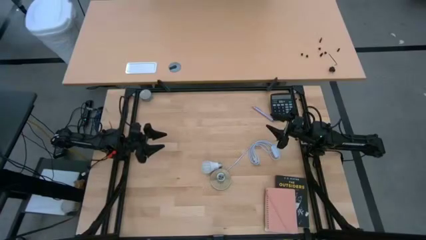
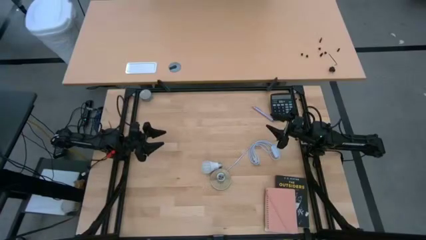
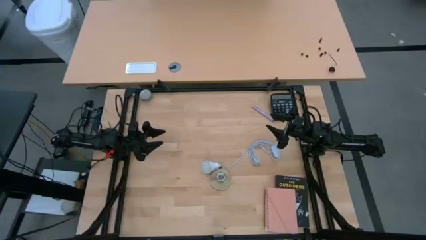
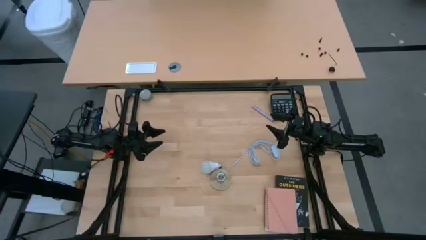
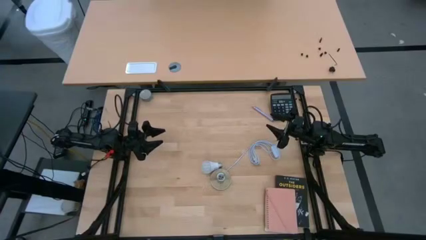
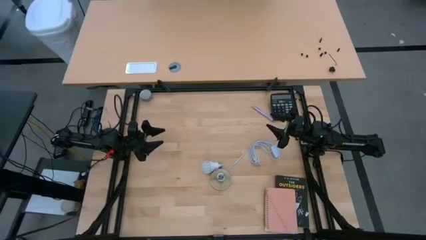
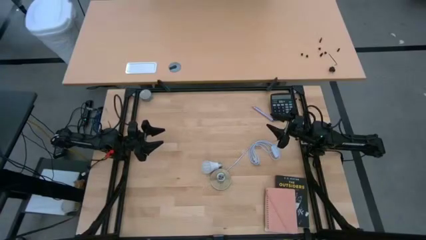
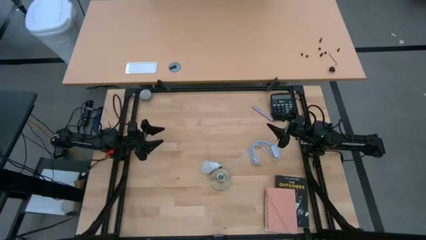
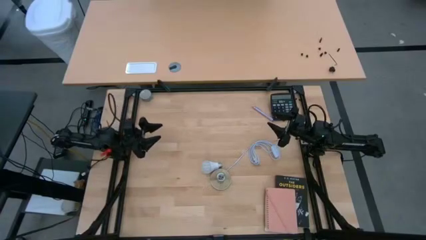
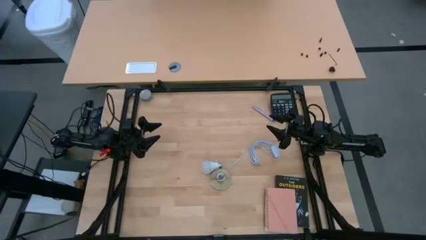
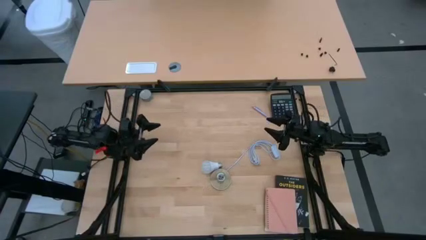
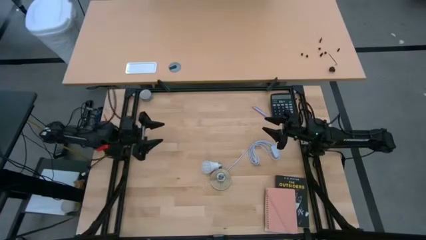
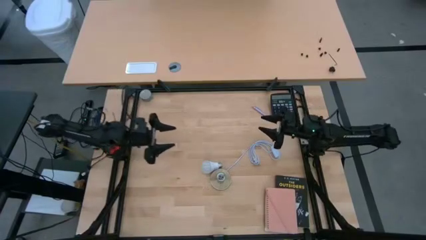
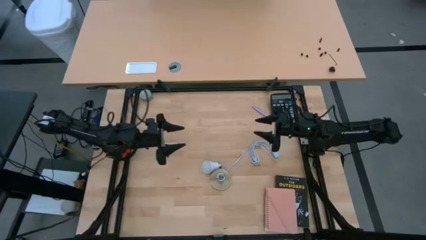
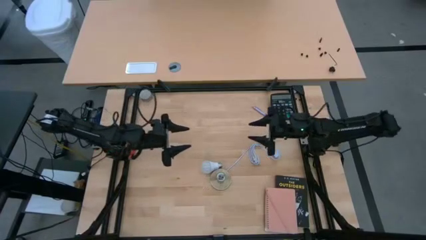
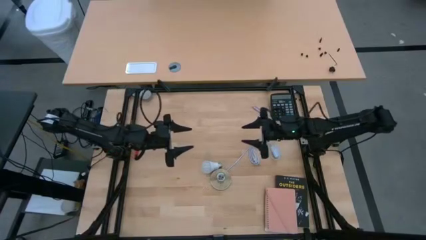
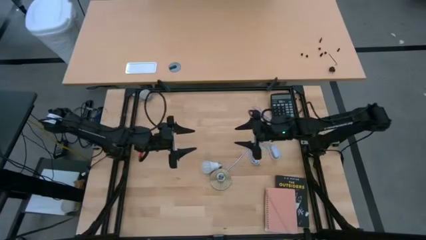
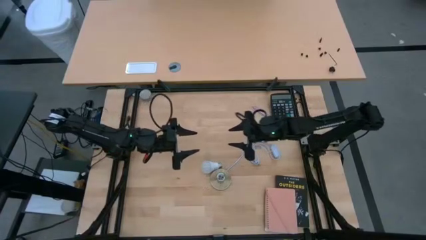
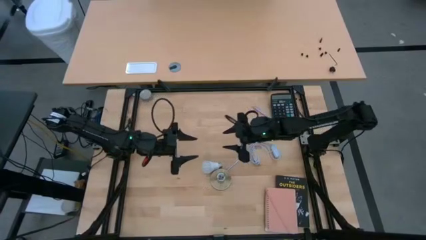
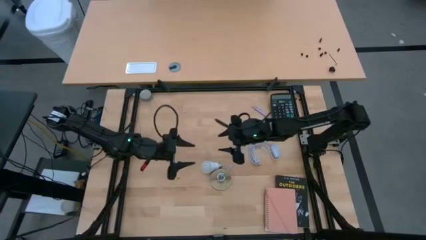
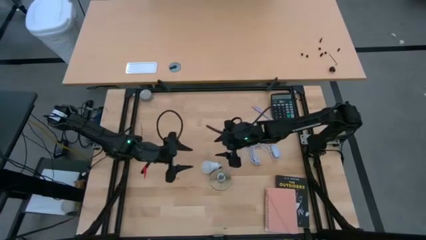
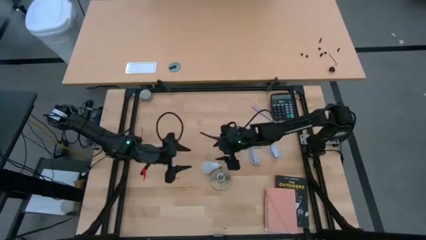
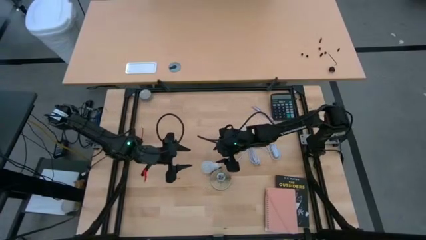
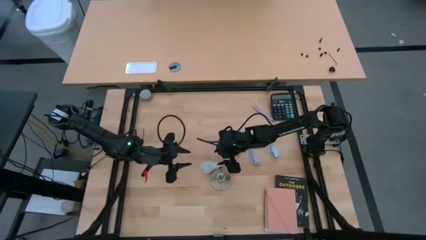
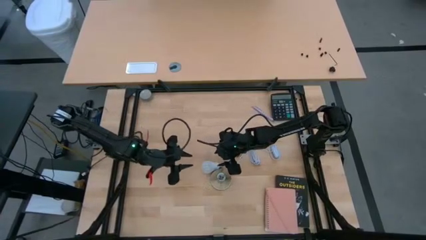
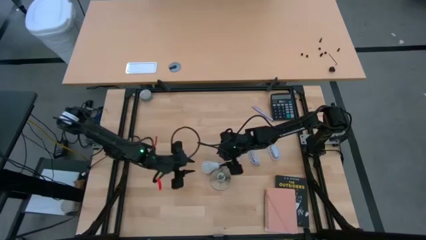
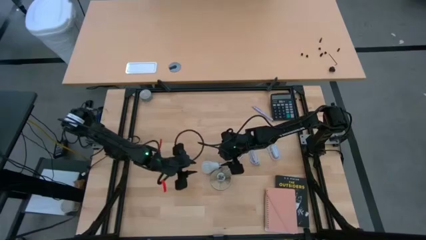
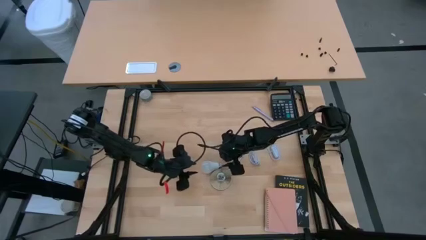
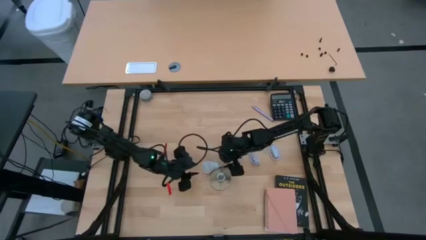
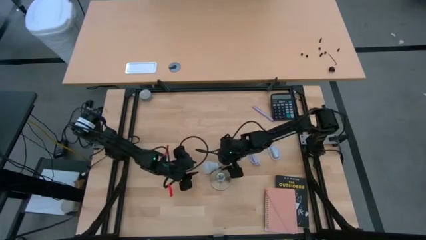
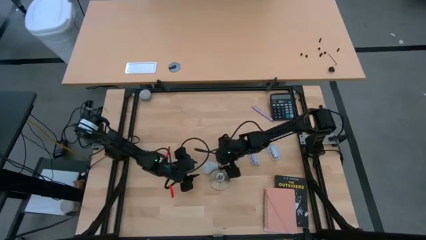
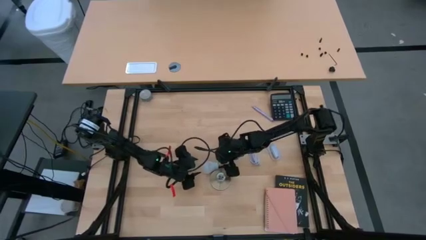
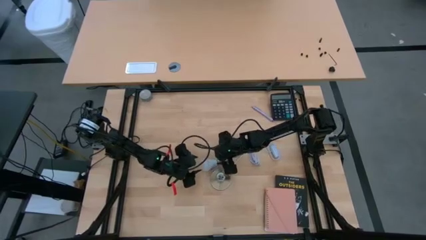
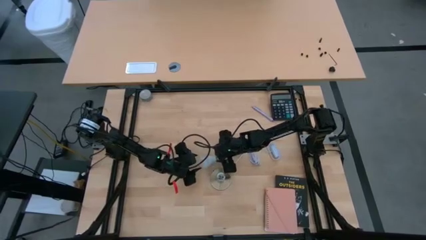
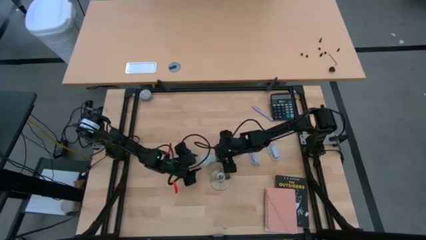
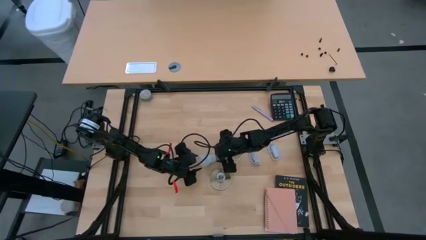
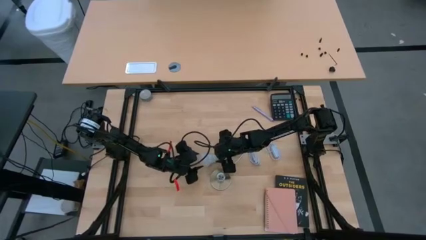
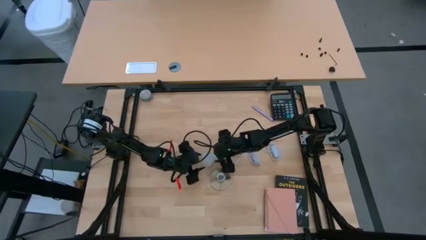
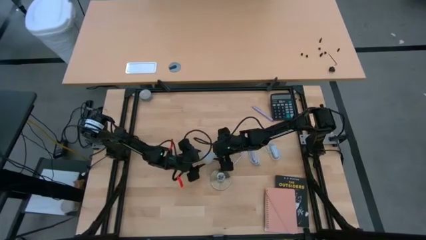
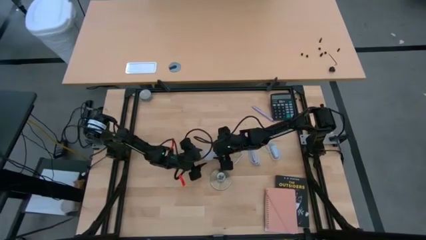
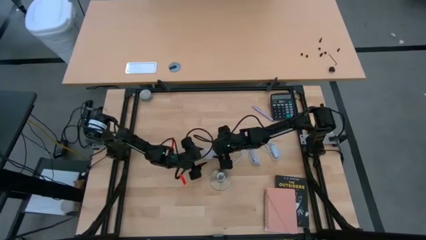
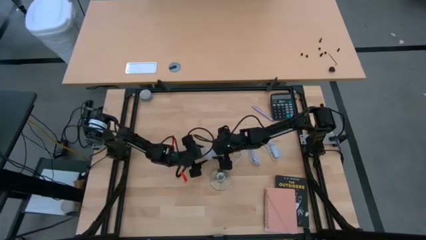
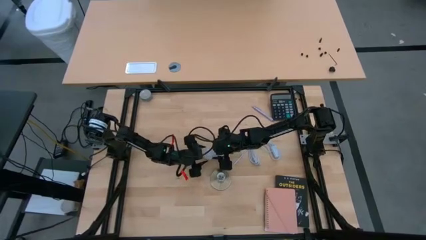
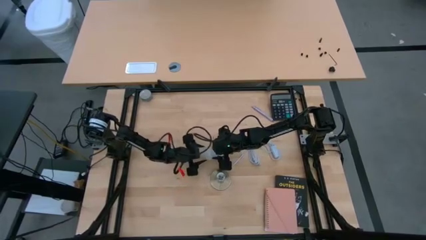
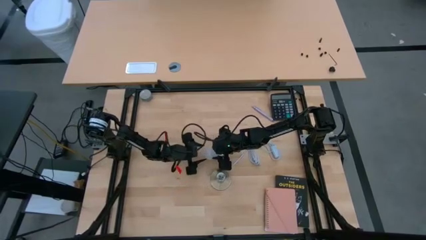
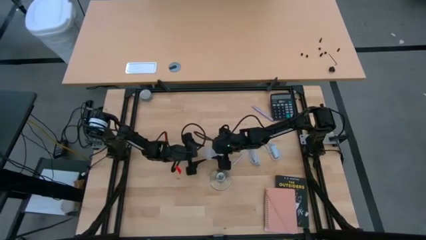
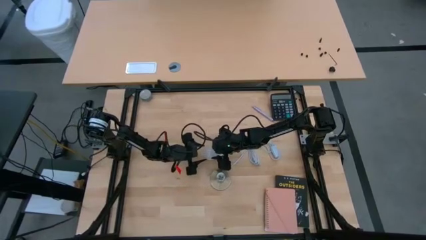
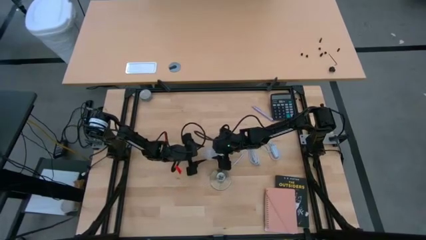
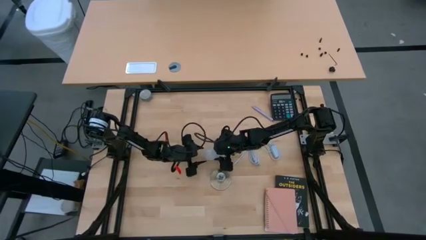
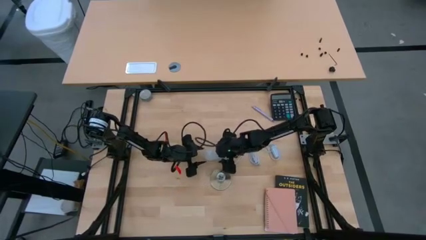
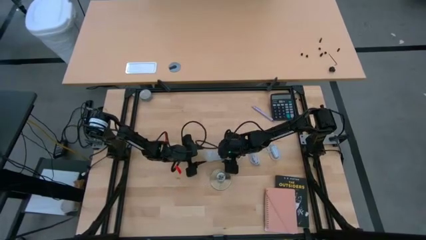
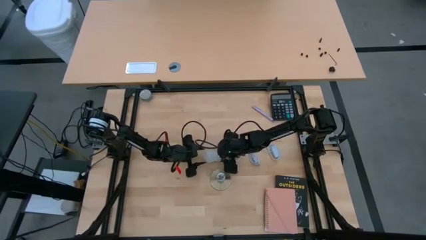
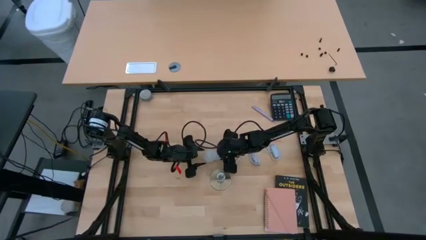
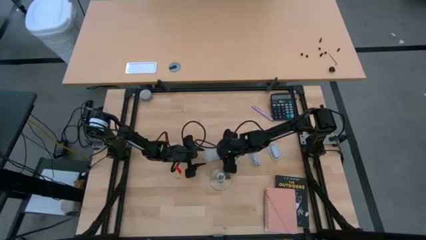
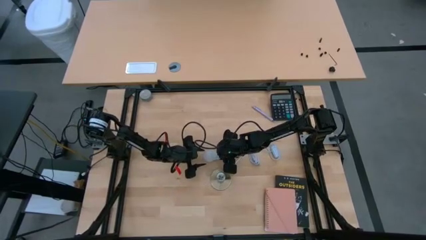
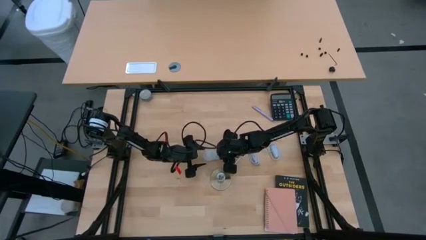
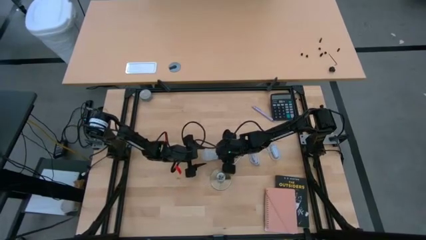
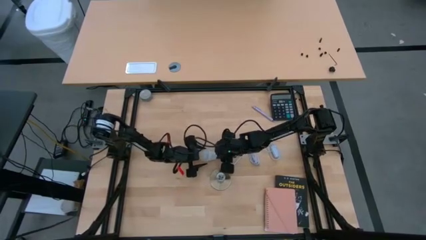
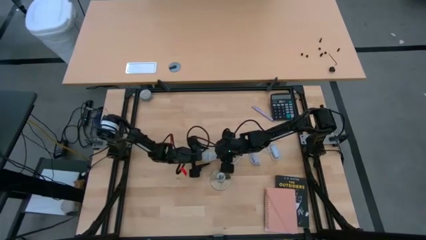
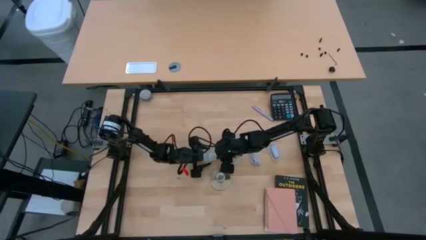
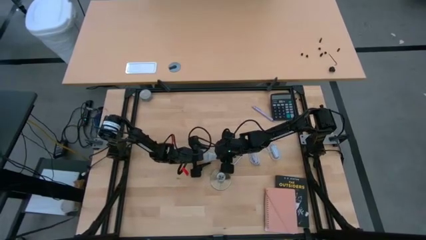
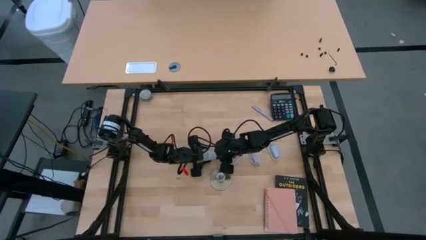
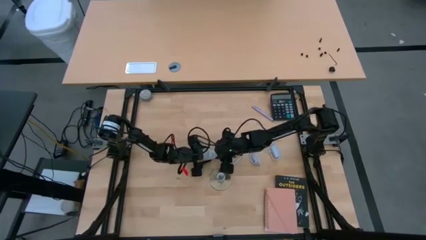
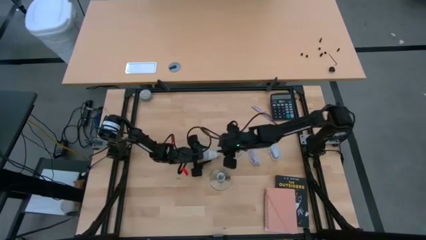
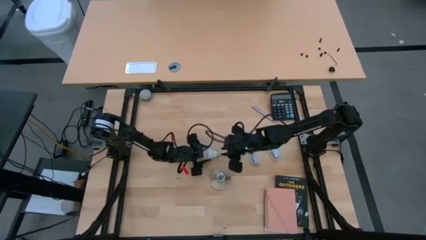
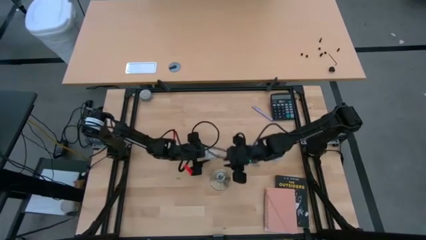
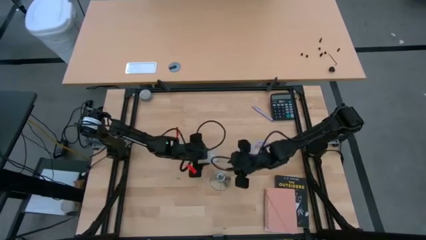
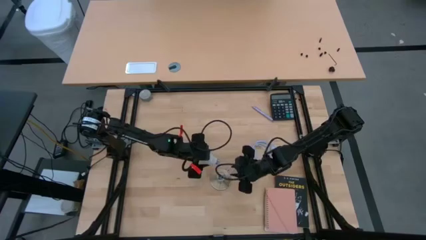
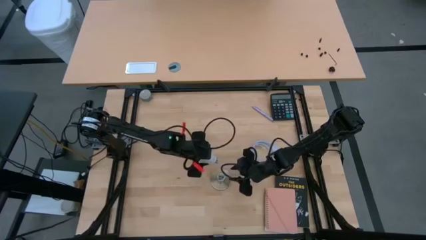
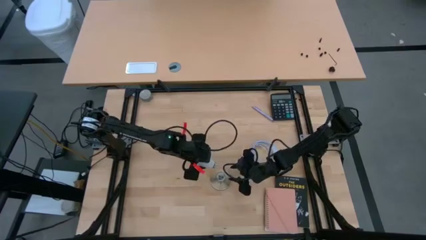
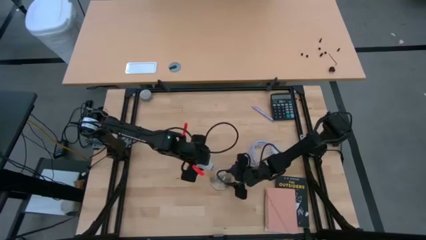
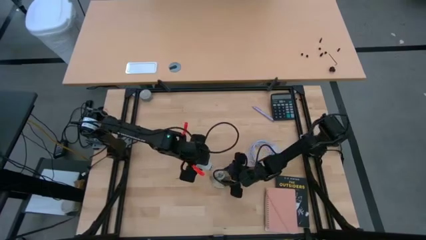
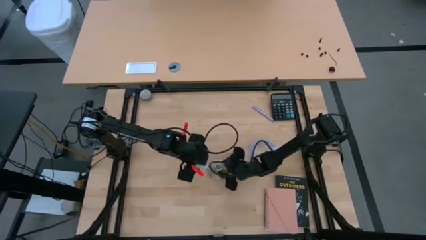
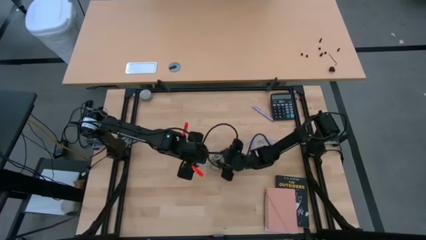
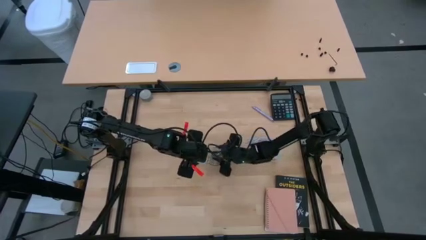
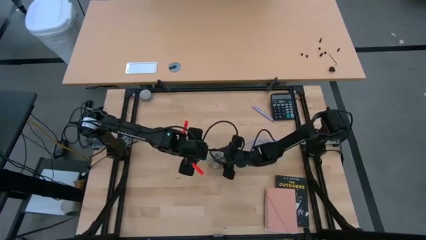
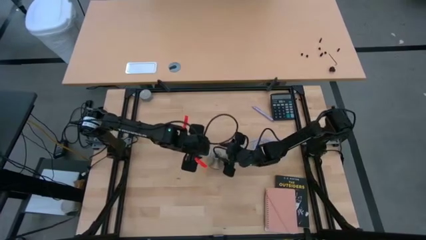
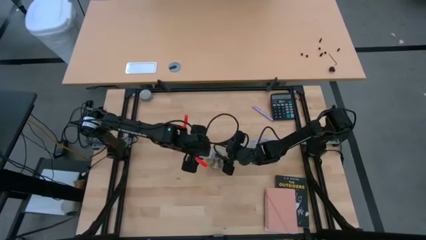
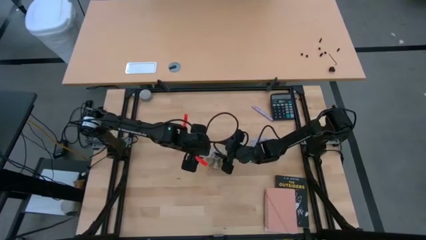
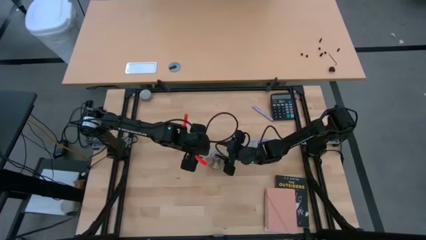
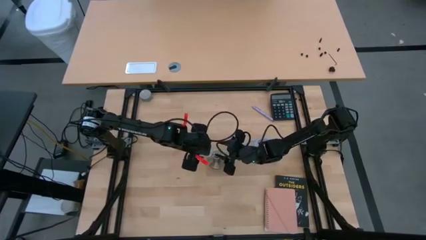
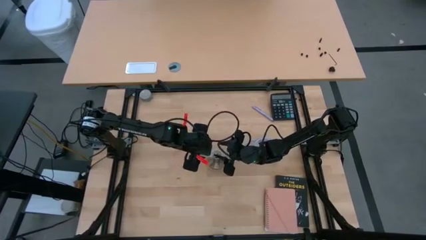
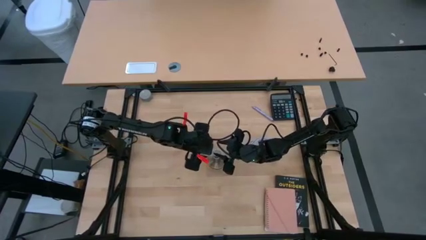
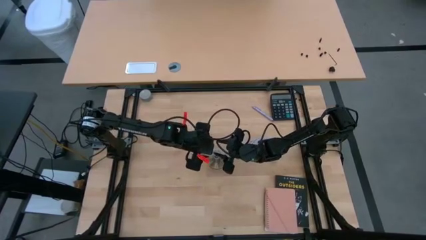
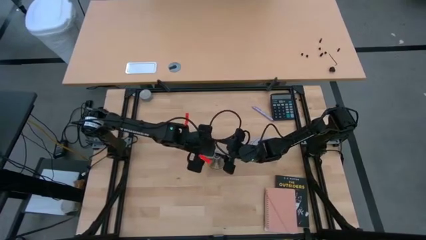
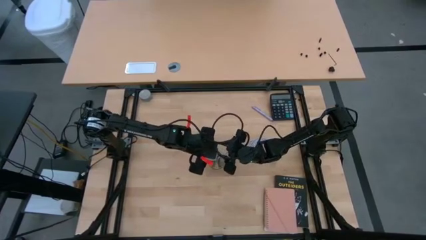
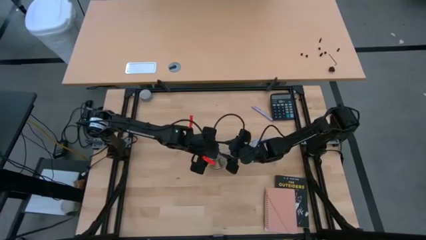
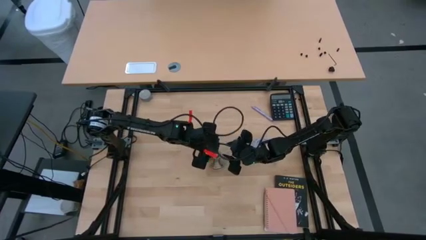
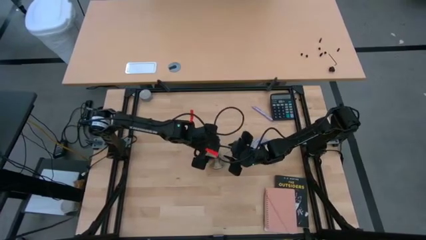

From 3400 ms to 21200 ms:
Task: Screw lightbulb
Insert the light bulb into the lamp
